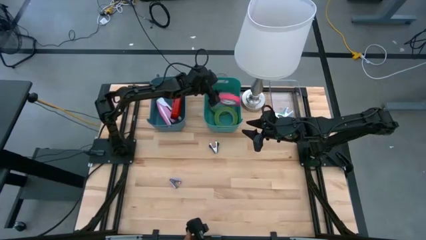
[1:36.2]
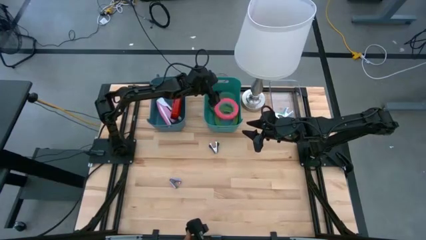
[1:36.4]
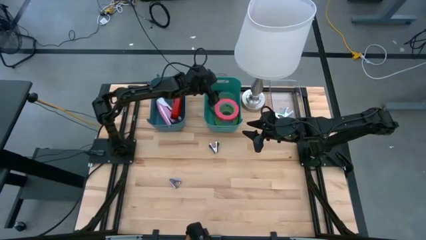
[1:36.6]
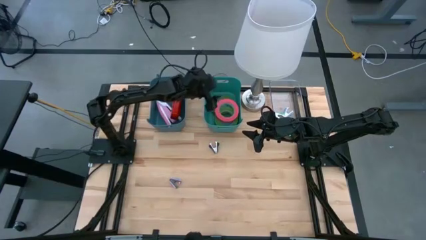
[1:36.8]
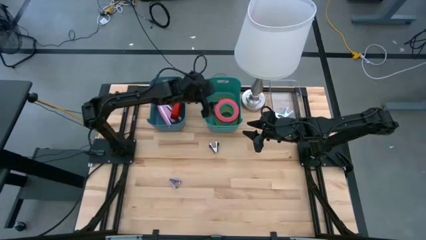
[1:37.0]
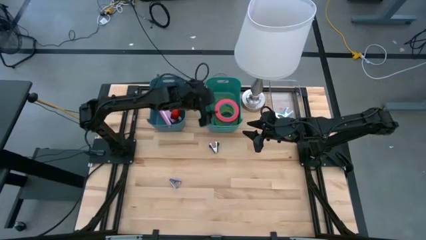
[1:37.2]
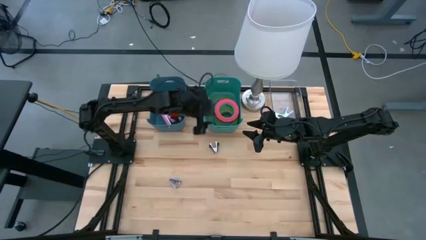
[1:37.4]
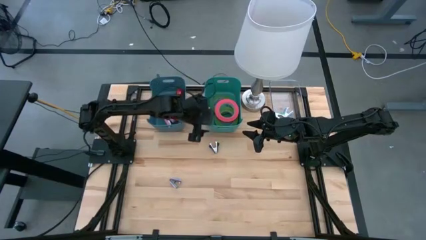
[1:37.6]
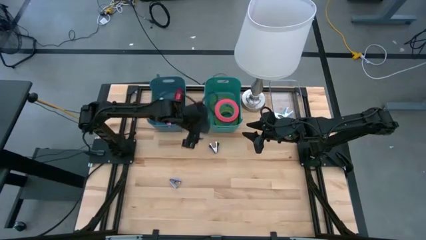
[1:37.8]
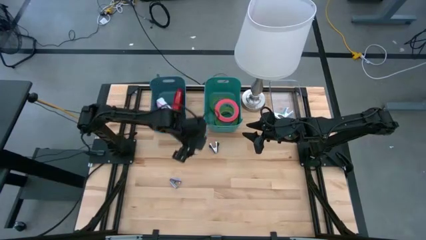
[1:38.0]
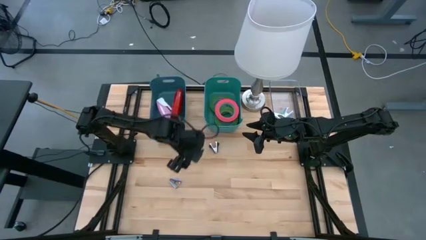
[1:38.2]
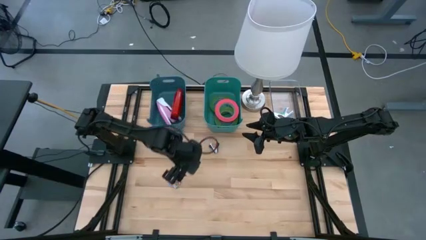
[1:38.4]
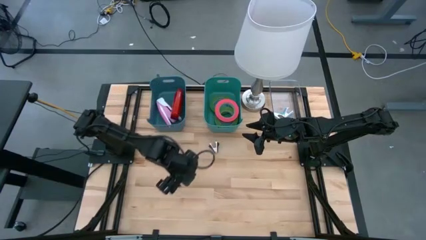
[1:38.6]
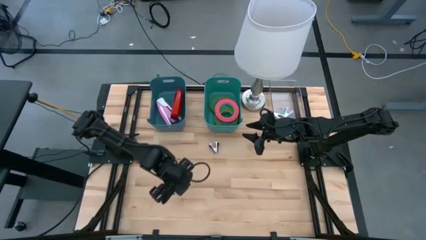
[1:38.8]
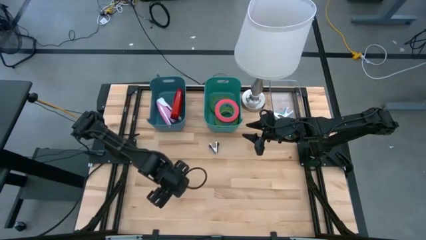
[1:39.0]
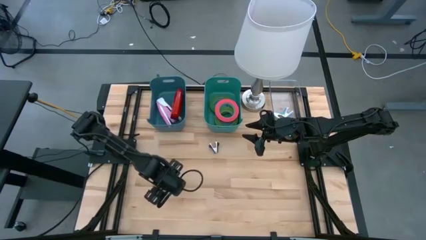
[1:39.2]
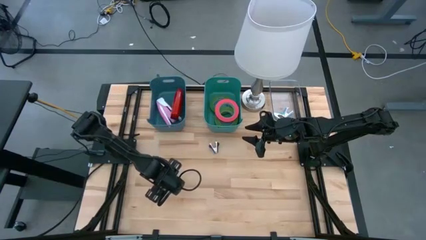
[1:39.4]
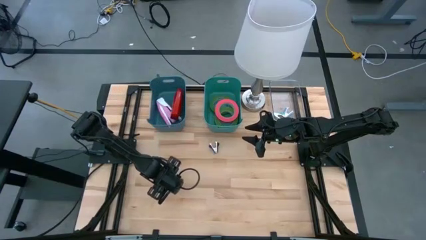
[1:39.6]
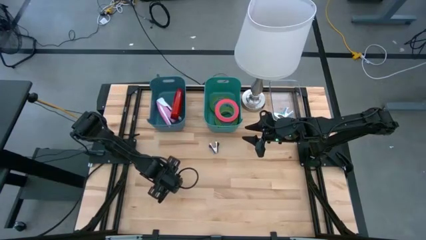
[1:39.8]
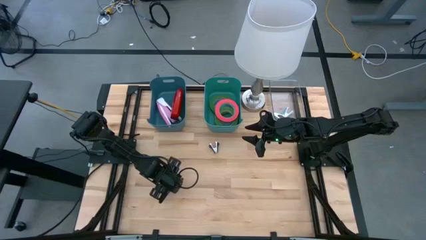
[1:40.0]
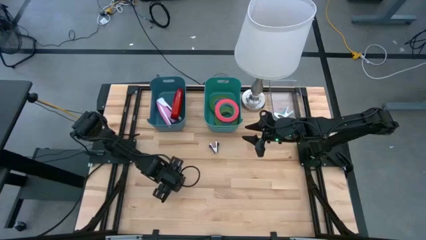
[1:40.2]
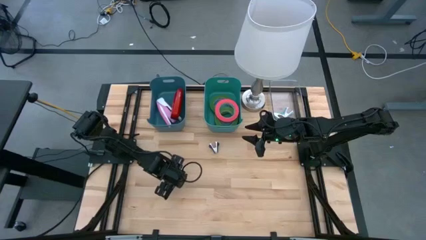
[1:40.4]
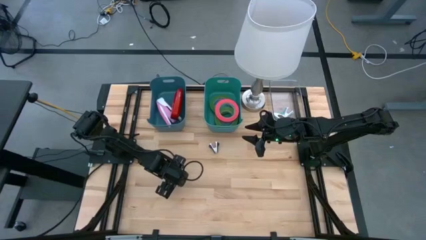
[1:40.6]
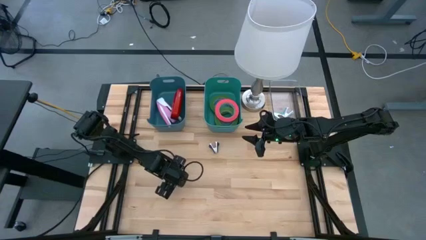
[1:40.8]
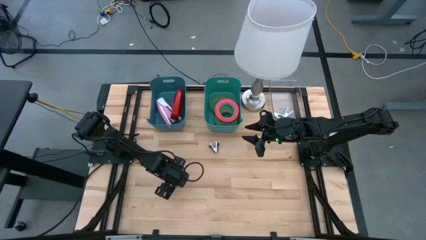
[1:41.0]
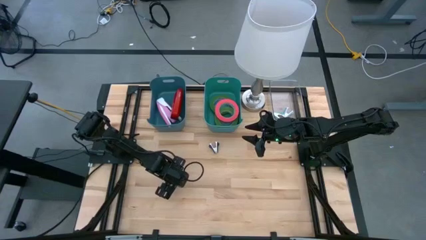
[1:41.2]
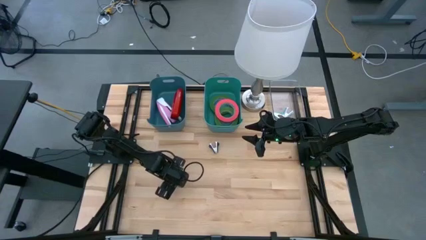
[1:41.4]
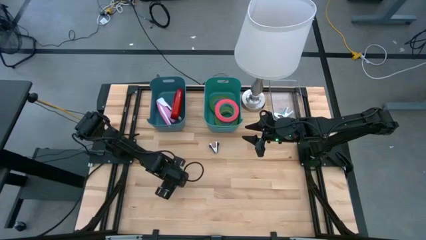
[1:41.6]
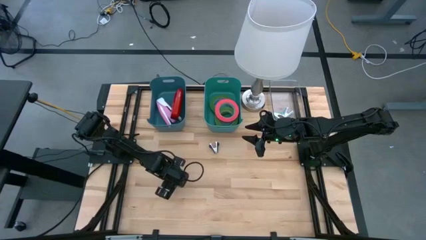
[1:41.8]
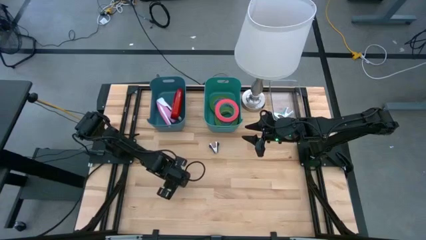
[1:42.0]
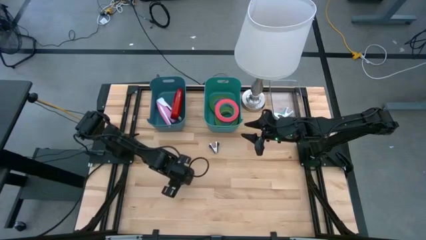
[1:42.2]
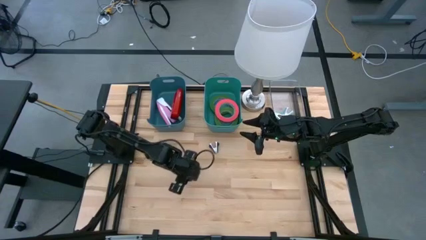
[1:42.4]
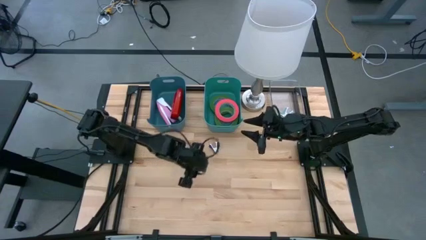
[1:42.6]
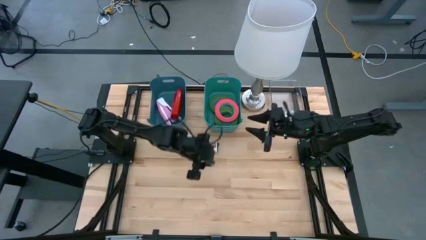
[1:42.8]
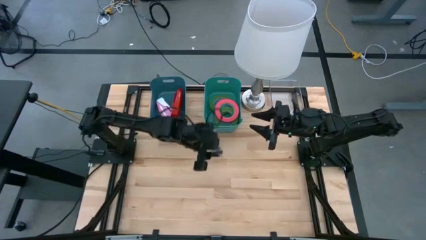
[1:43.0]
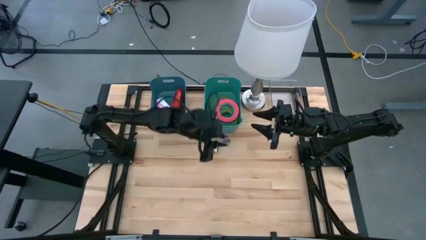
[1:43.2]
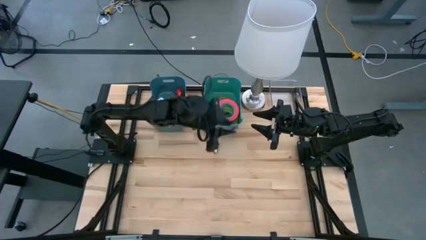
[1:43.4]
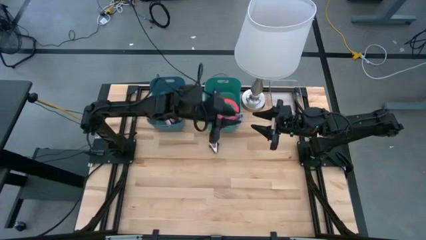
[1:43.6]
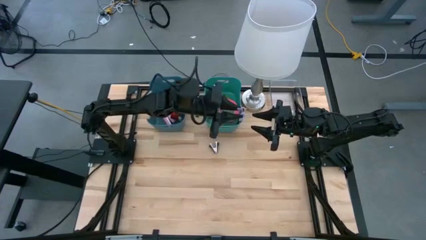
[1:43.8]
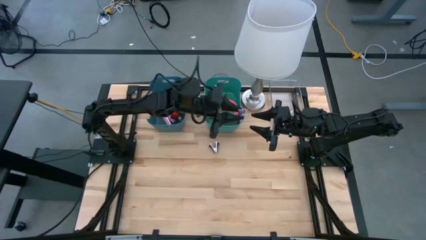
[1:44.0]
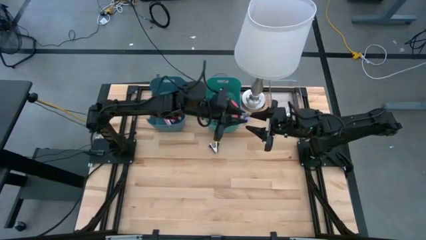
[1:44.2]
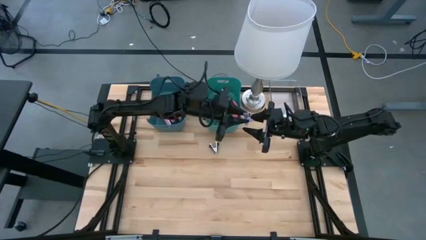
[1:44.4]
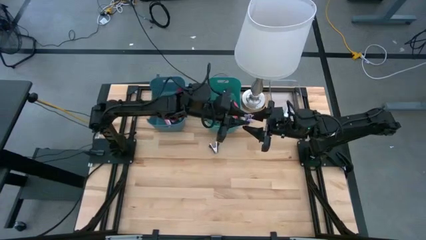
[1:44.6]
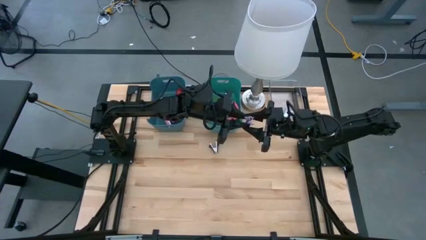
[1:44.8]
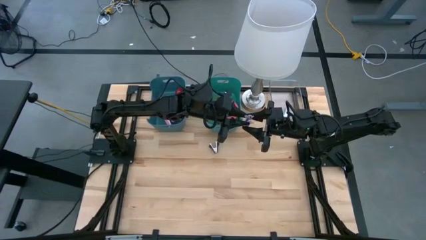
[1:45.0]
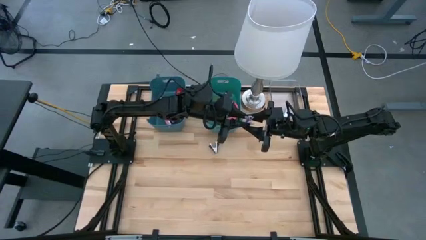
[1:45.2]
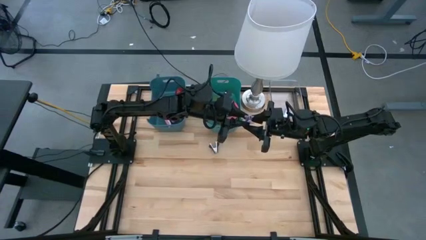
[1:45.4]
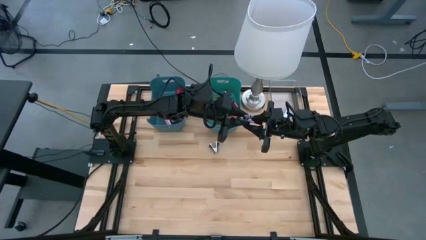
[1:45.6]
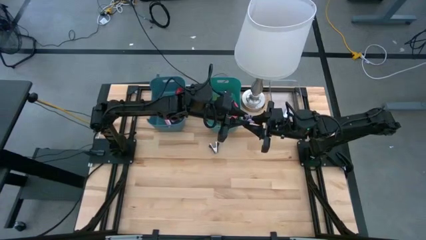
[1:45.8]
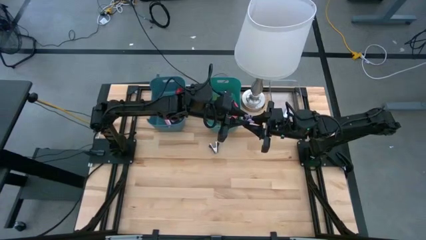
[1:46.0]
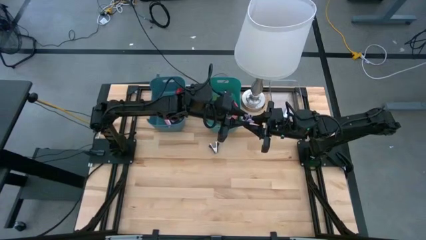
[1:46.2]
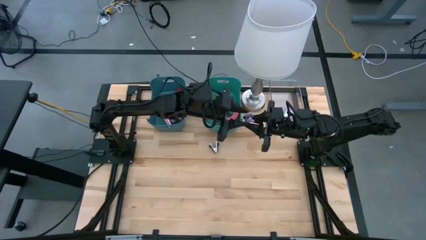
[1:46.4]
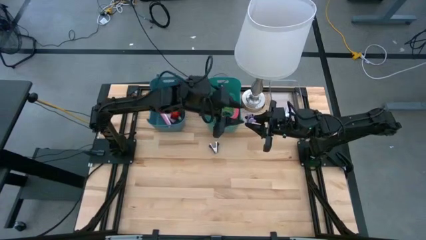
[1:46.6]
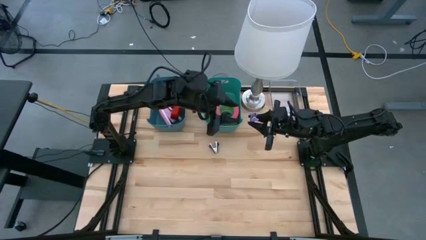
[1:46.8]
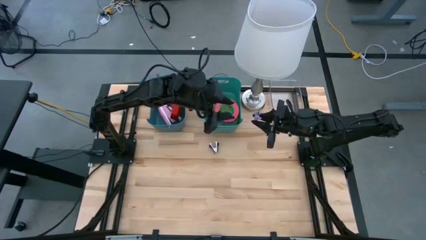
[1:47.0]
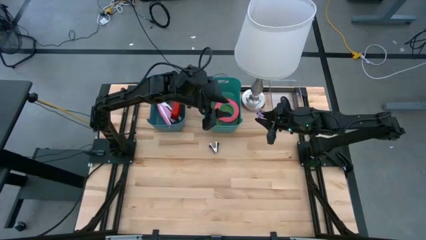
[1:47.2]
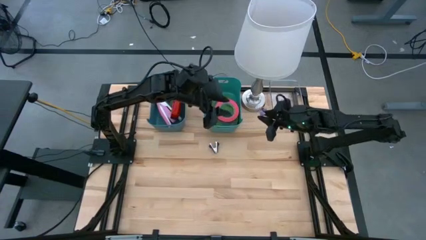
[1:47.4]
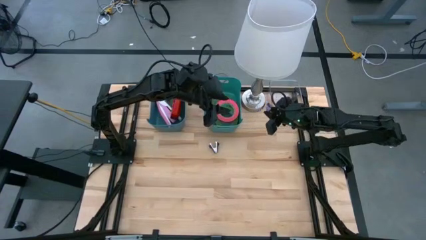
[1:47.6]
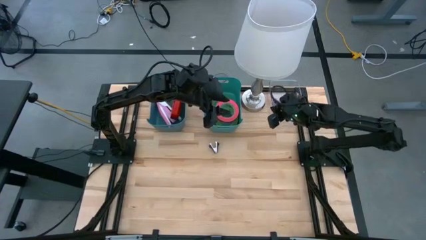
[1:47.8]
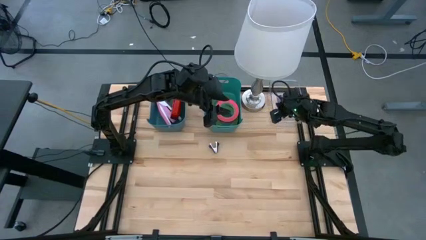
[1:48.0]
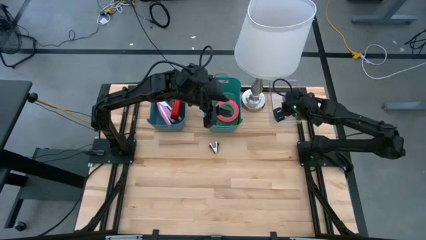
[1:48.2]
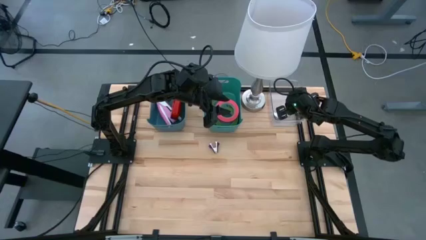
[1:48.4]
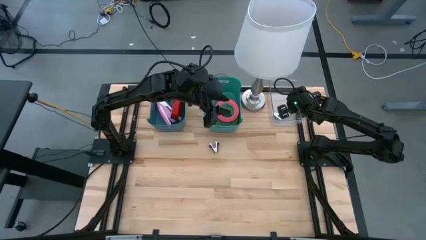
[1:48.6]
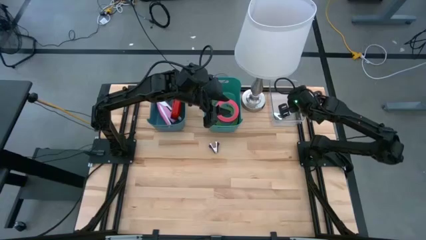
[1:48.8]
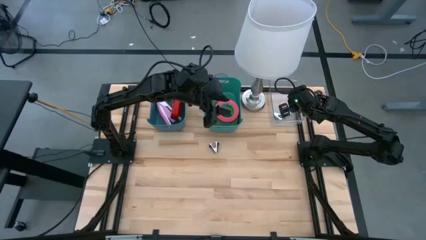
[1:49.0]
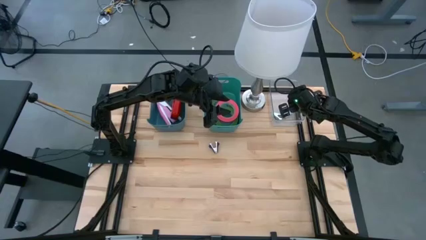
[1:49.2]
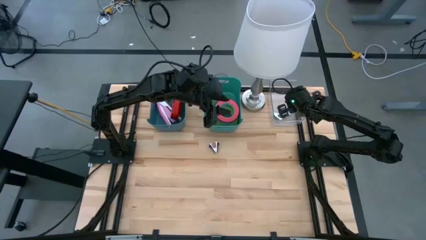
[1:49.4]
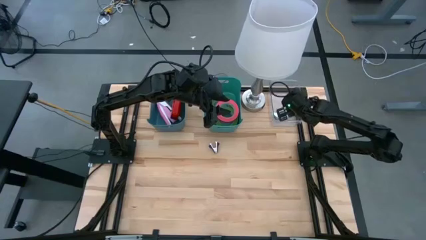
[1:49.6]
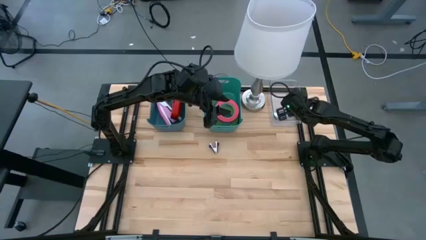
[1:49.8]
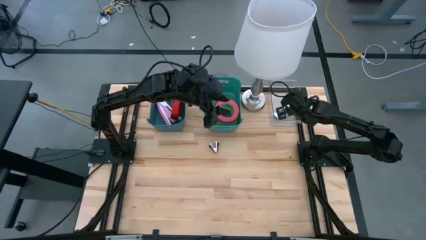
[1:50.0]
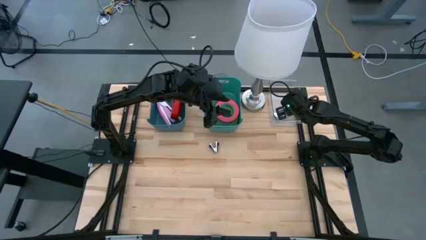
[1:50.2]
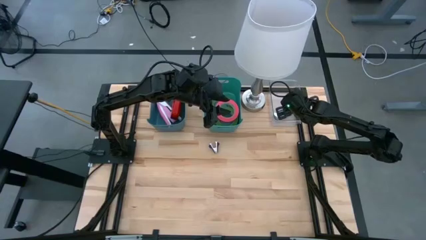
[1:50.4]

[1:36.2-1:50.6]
Task: Pick and place Stapler, Stapler remover, tape
Put the purple staple remover into the transparent bin
